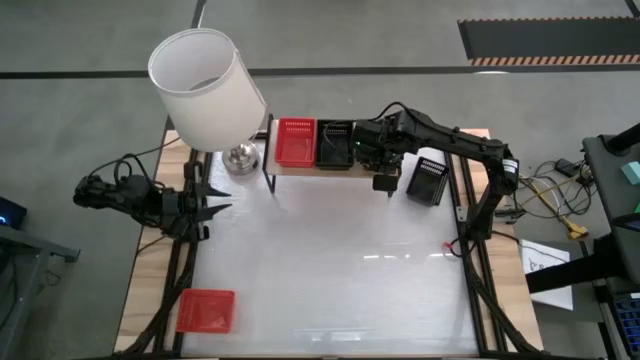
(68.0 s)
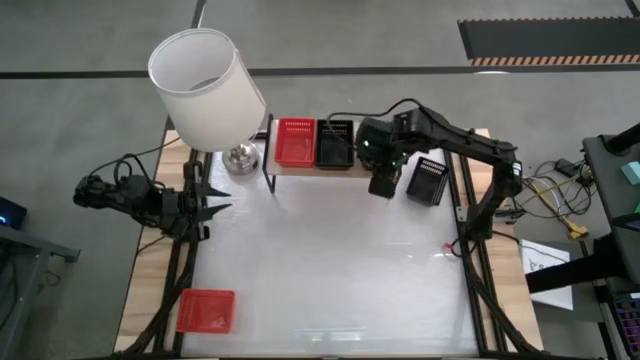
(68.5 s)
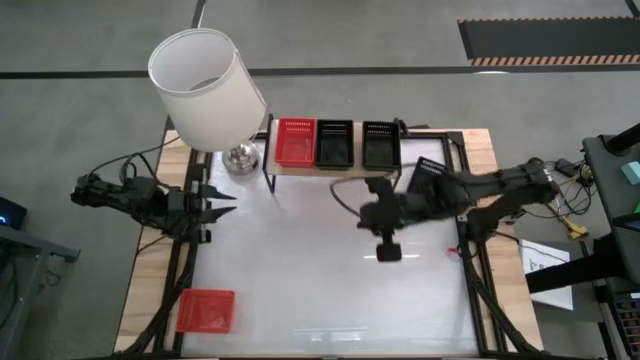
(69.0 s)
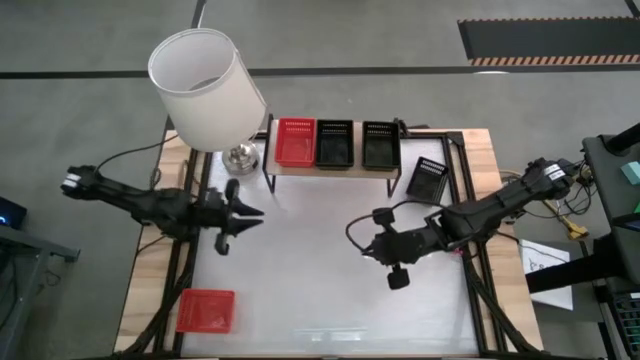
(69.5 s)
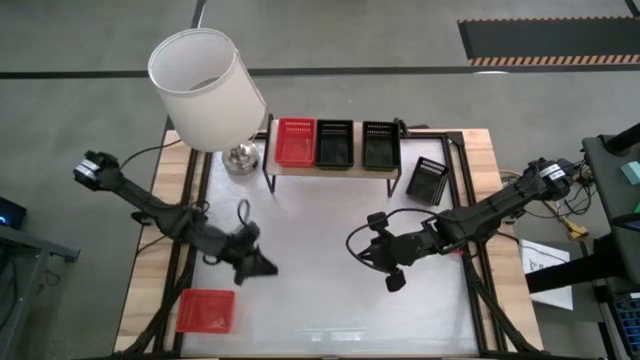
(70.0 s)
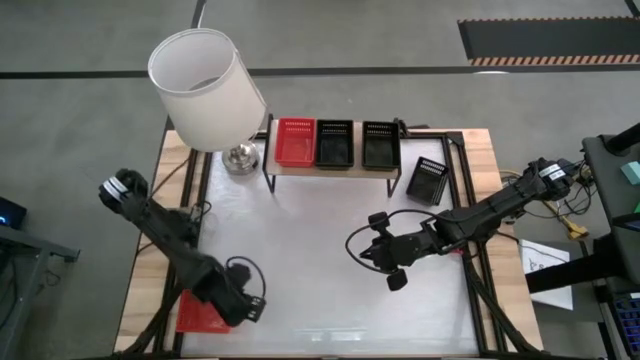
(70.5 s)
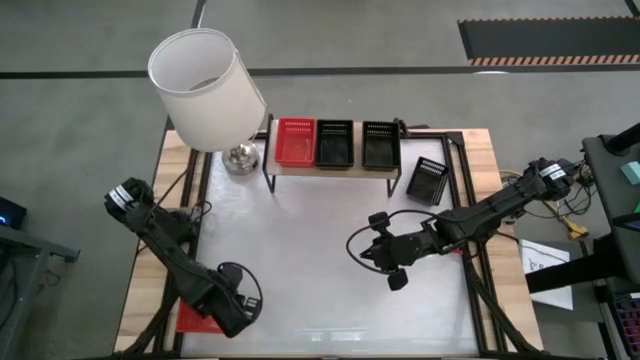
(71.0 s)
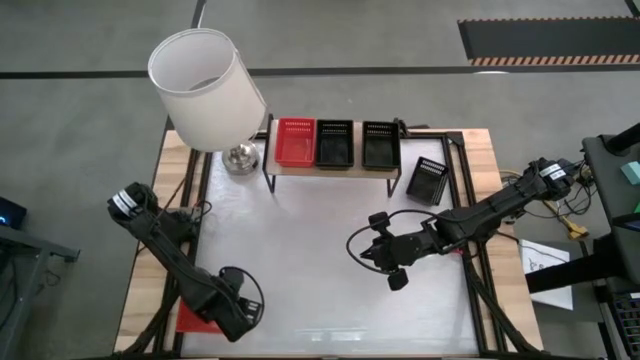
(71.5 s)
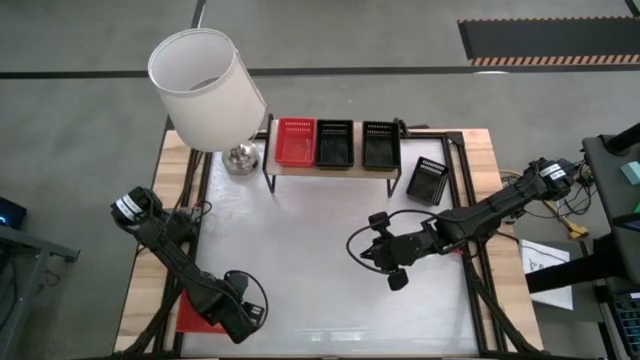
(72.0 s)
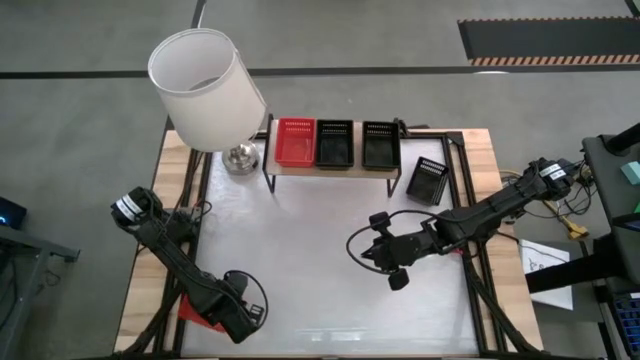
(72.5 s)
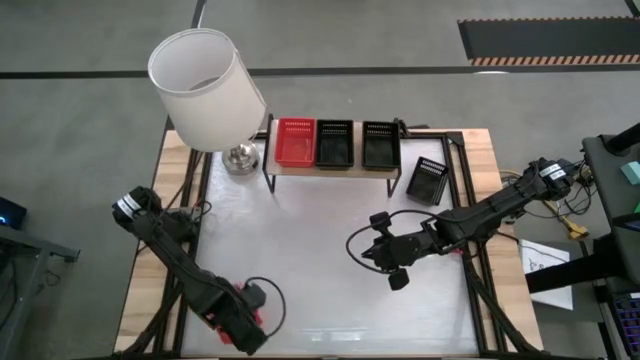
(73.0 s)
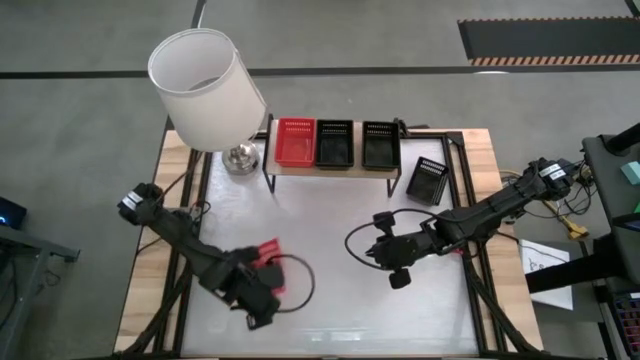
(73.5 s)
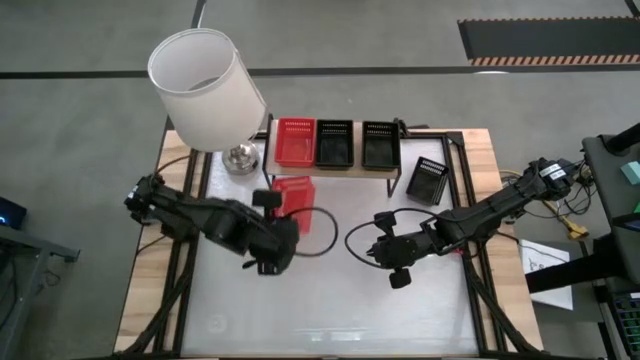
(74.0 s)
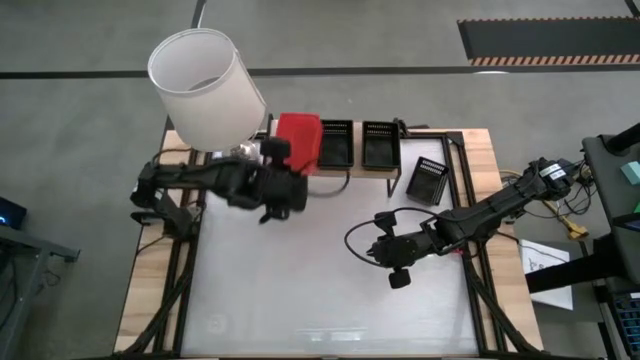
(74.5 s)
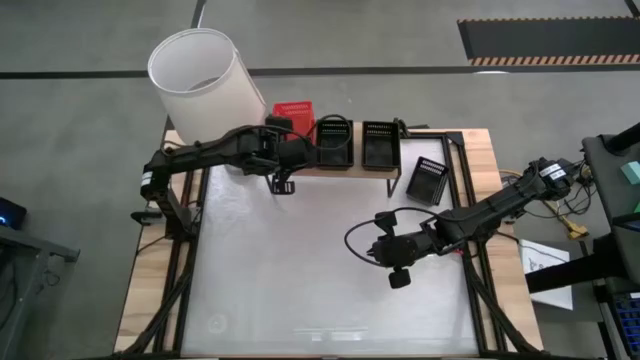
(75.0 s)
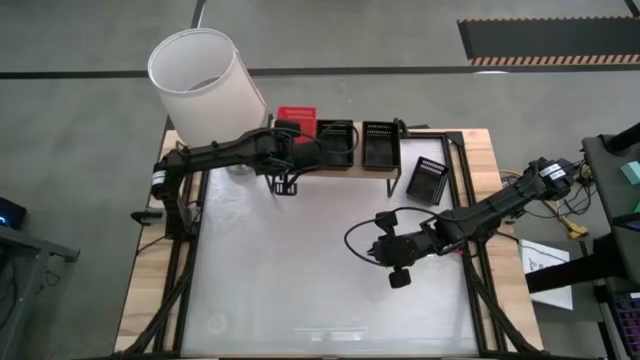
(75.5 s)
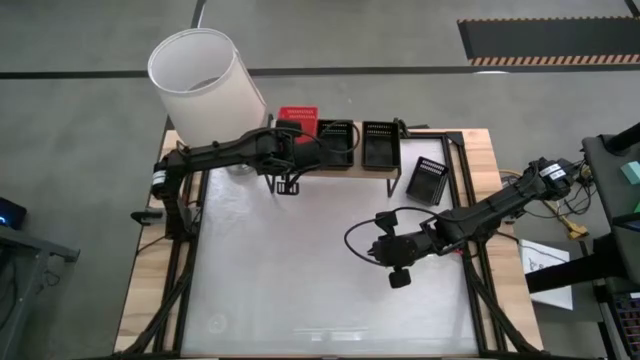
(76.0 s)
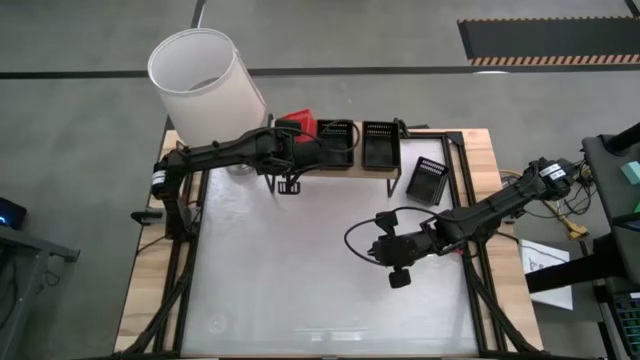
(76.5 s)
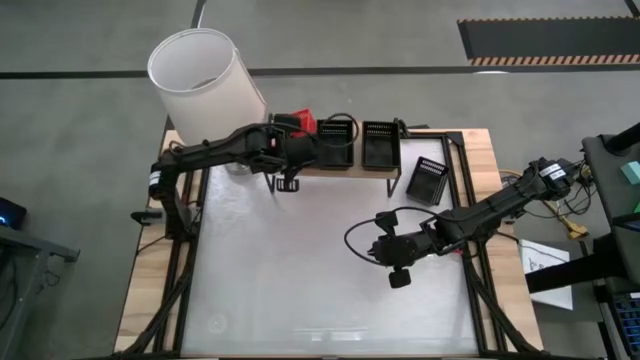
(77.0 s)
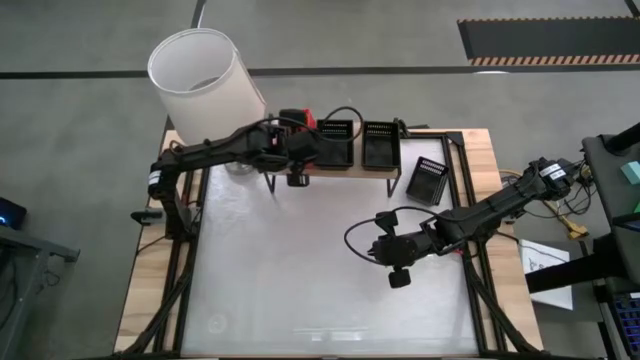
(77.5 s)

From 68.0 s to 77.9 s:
Stack the red basket into the other red basket on the shelf

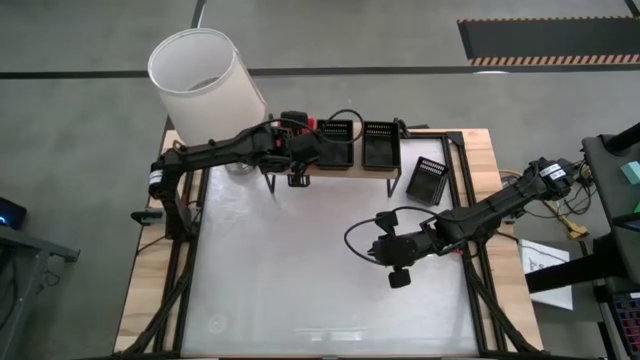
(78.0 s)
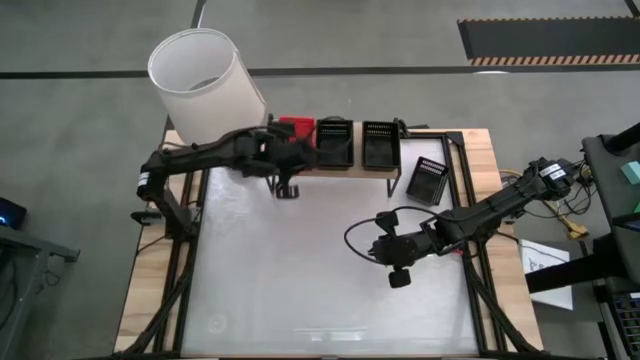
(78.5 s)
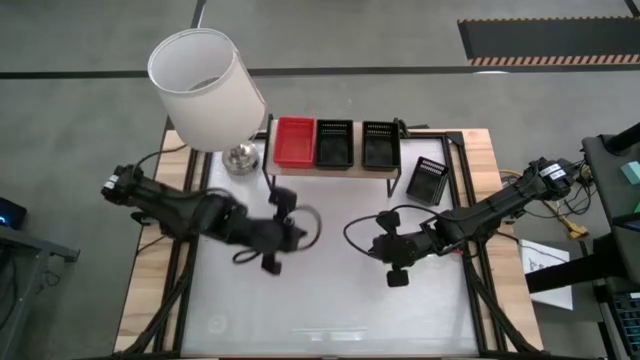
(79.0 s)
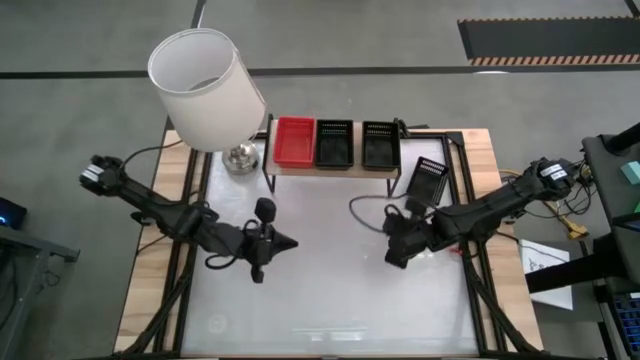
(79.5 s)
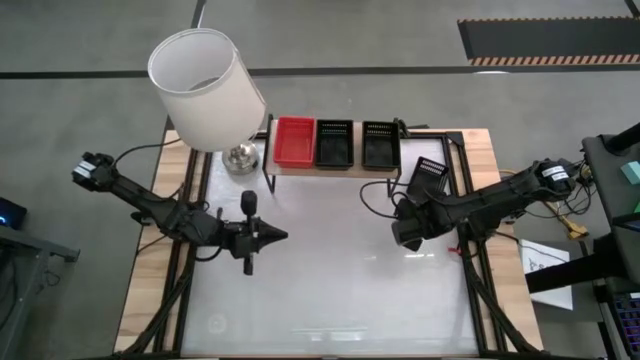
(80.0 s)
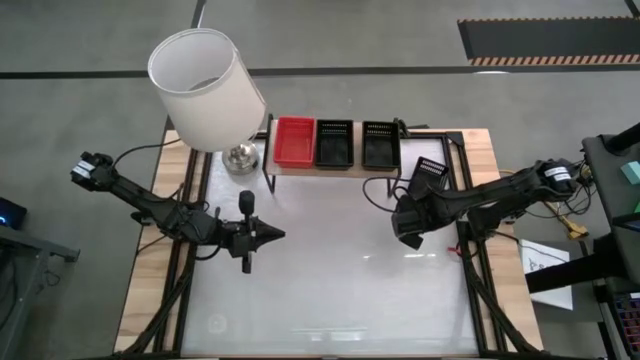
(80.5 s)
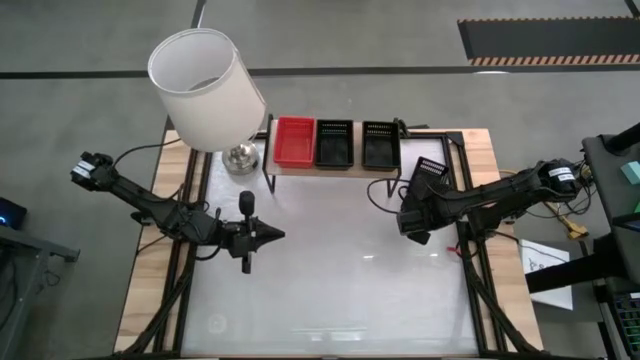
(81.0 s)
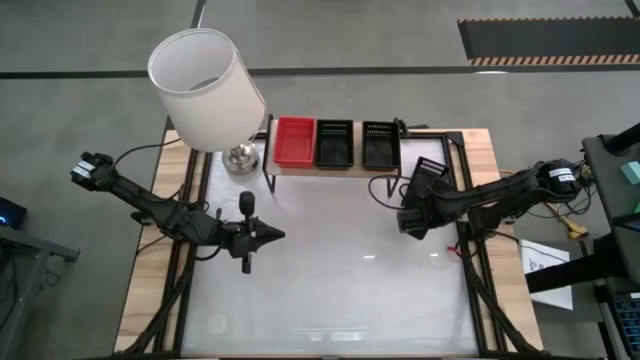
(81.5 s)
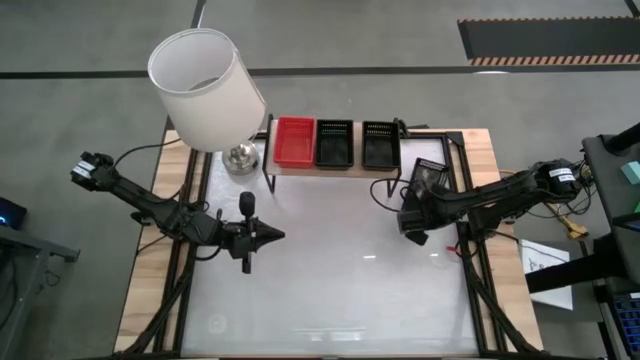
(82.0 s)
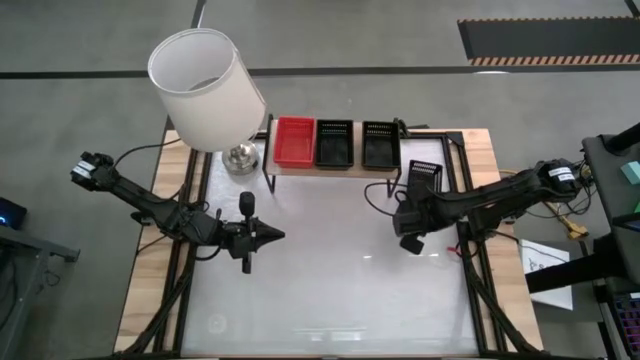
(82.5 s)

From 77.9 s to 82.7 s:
Stack the black basket into the other black basket on the shelf

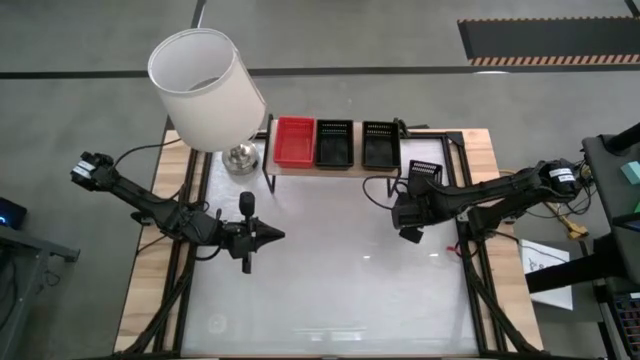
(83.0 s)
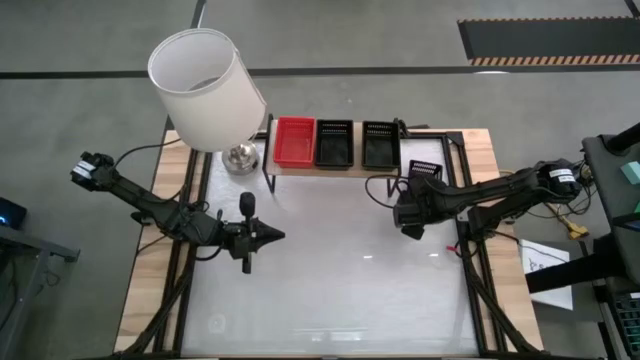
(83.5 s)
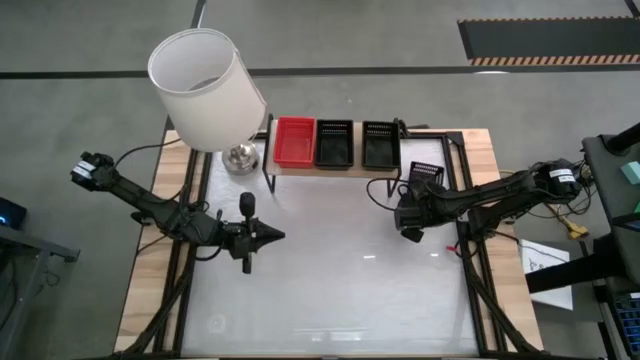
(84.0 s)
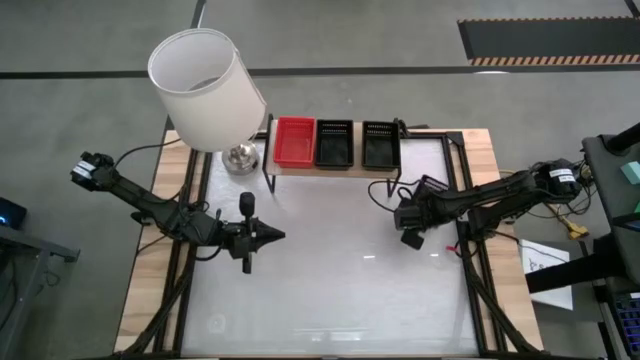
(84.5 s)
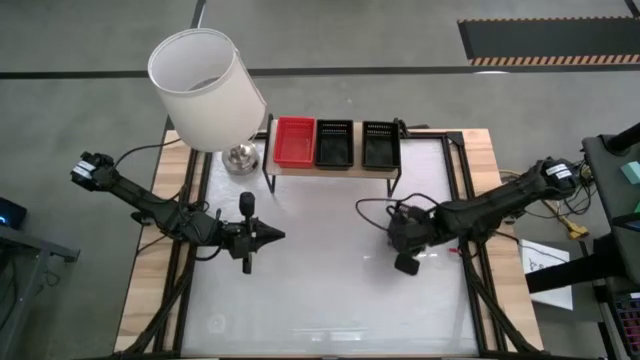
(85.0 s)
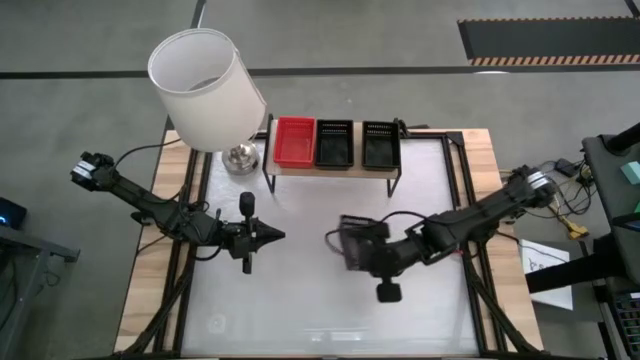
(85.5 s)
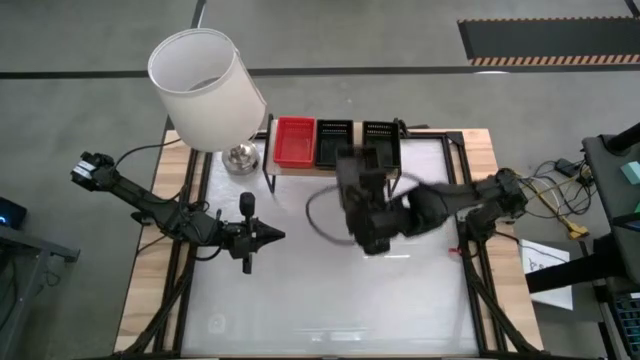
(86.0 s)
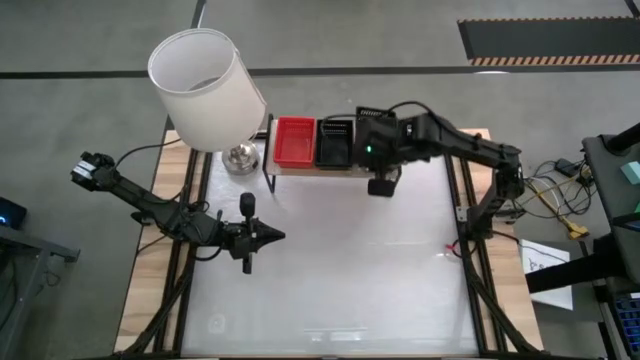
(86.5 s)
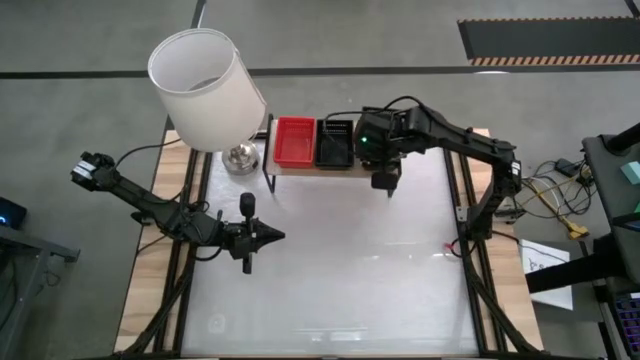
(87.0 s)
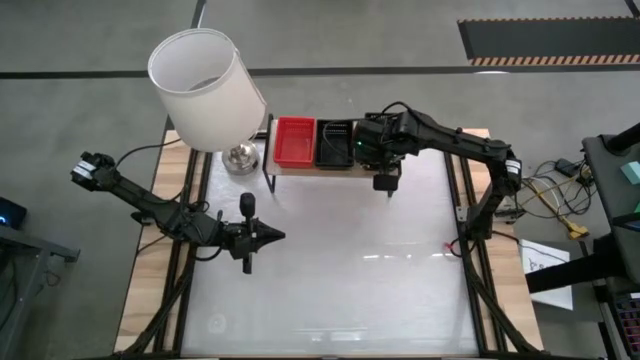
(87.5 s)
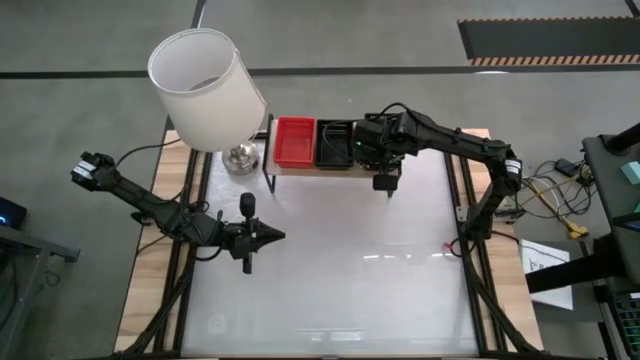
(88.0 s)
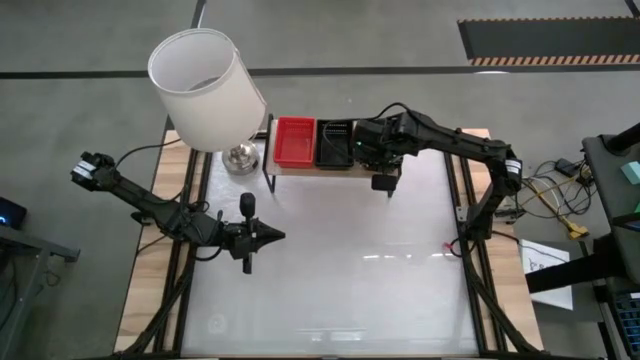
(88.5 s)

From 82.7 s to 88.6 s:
Stack the black basket into the other black basket on the shelf
